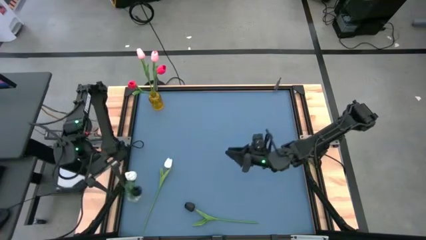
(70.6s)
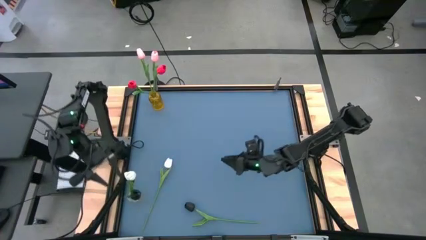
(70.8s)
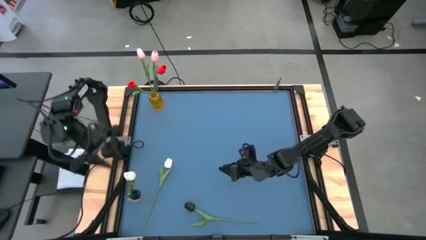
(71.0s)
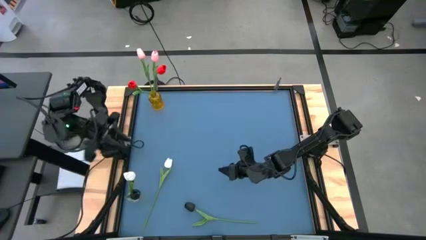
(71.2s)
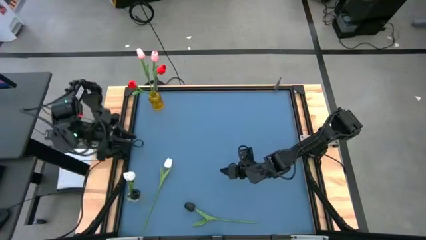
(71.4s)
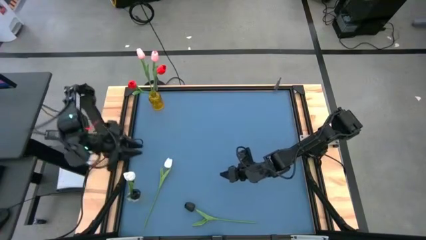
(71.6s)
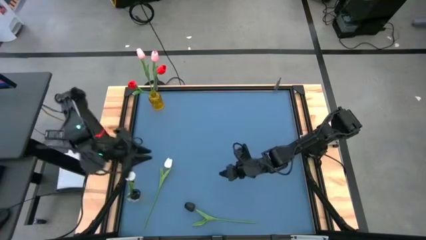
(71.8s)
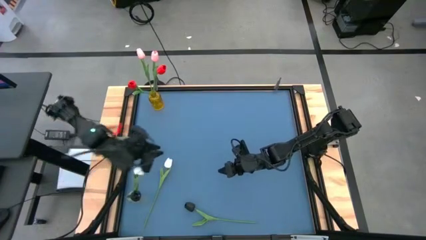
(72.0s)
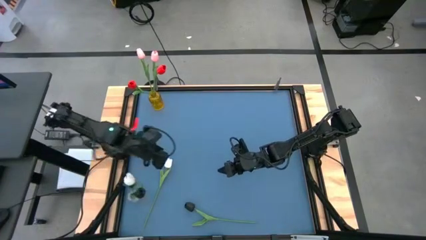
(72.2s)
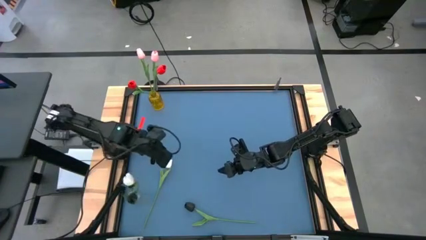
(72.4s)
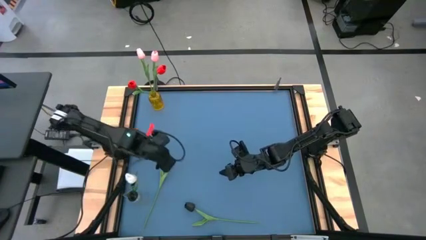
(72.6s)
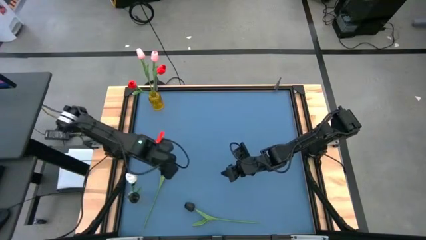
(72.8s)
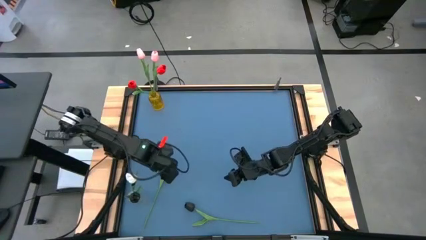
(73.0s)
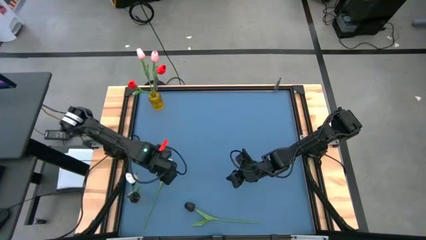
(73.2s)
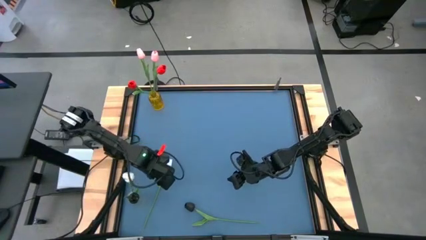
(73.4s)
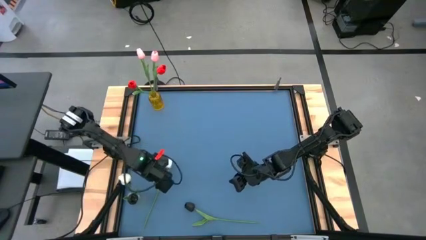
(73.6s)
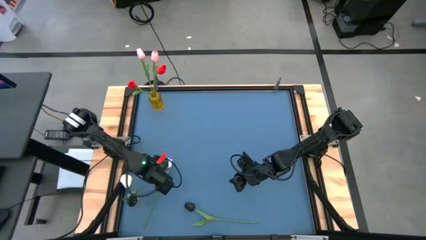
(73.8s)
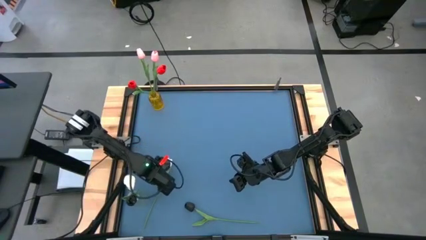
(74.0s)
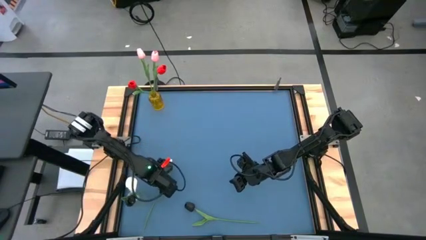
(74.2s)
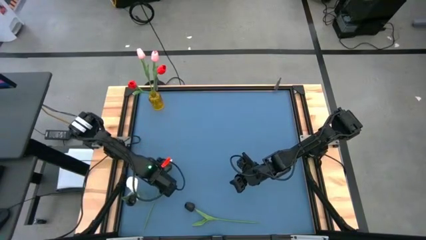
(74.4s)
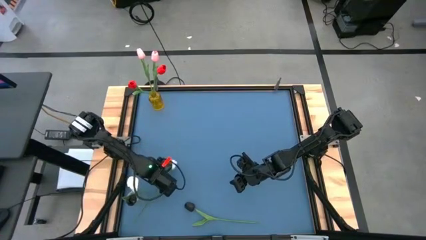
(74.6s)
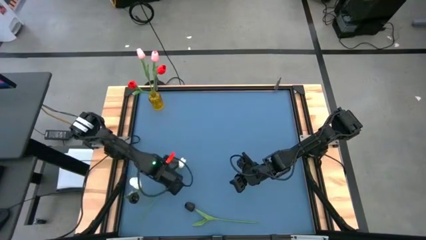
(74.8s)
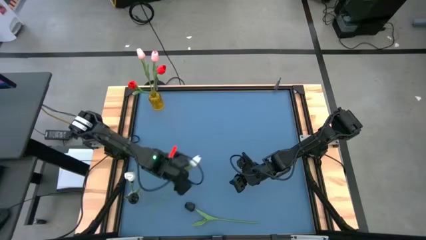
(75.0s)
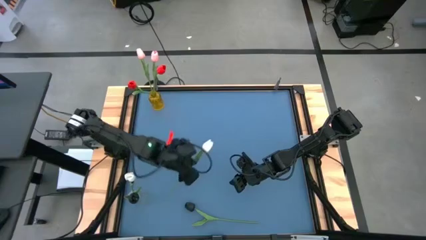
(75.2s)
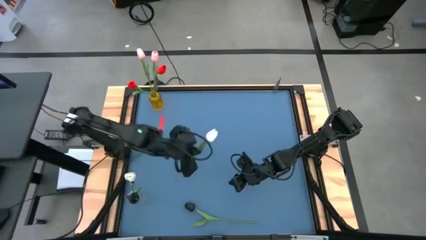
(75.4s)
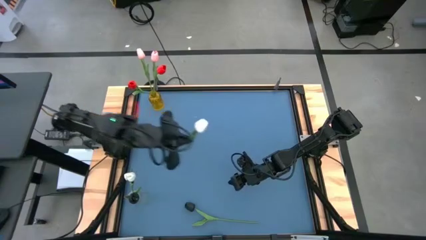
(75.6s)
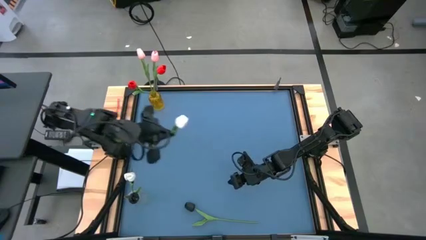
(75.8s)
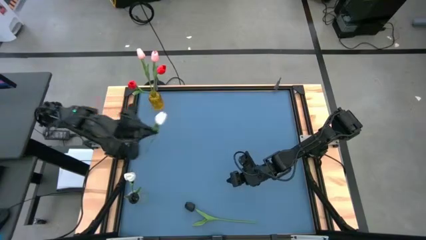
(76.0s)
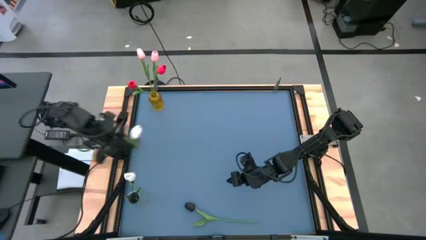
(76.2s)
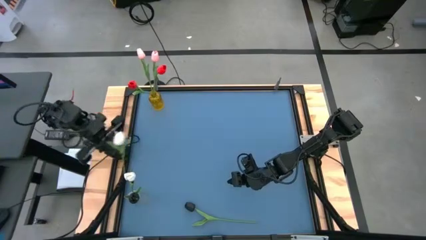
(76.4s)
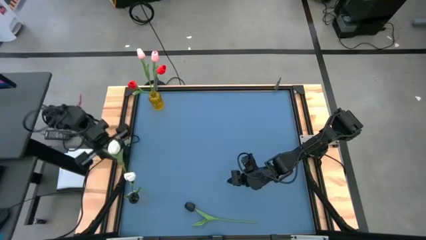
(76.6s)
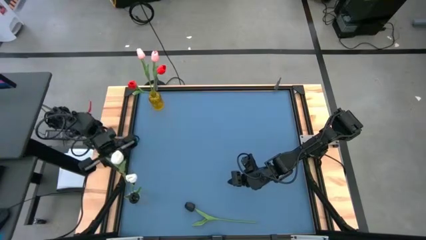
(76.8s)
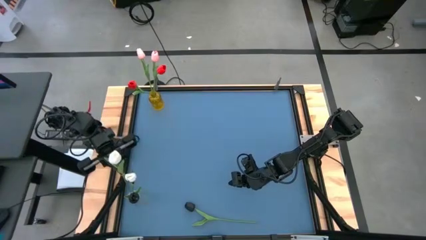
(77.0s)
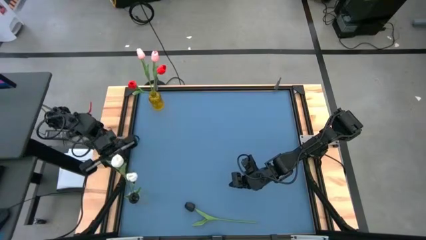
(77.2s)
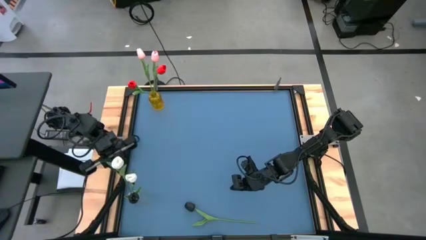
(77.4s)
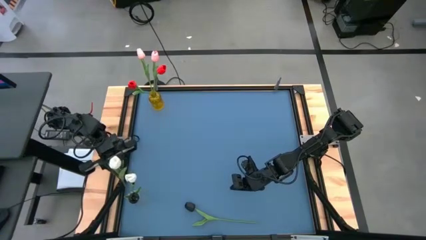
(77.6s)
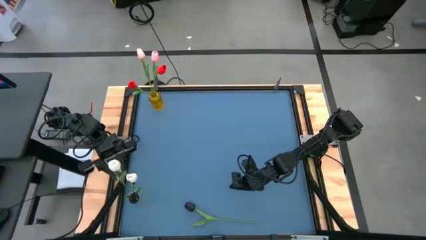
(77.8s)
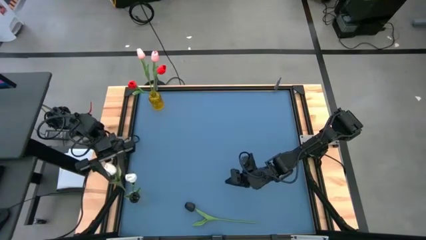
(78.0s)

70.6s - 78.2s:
Task: Sort flowers into vase by color
Put the white flower into the transparent vase

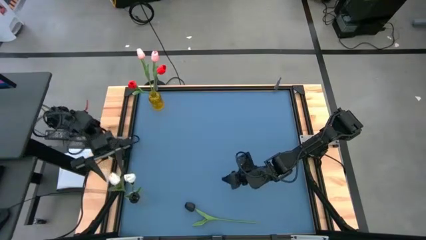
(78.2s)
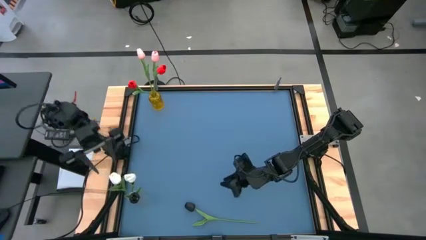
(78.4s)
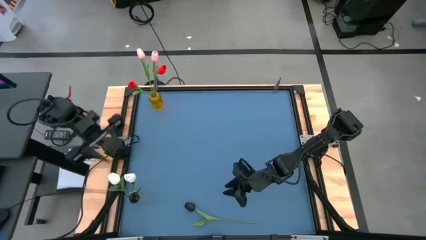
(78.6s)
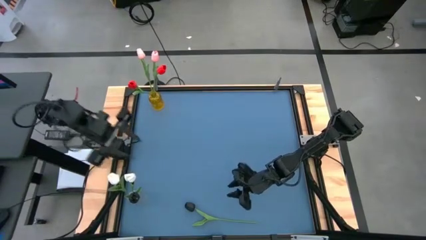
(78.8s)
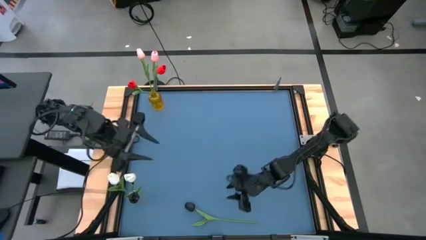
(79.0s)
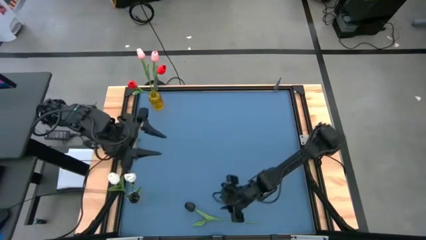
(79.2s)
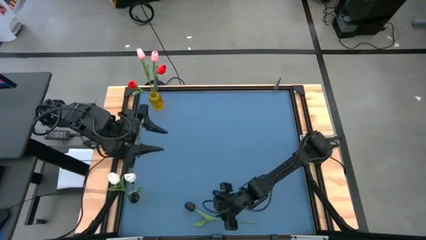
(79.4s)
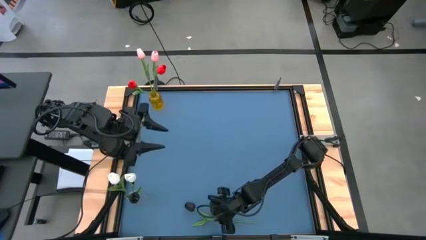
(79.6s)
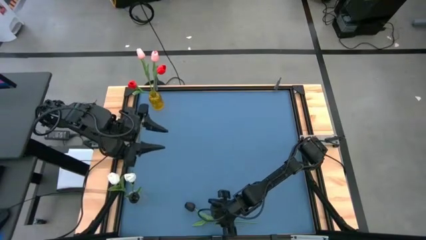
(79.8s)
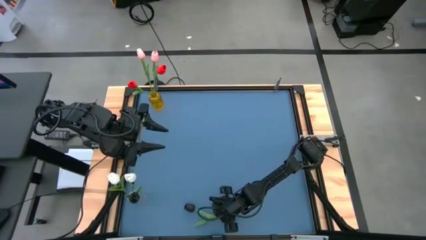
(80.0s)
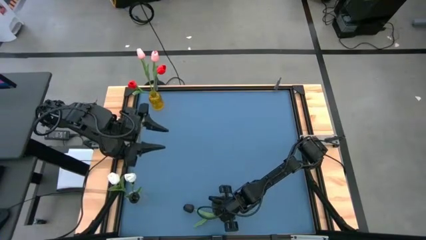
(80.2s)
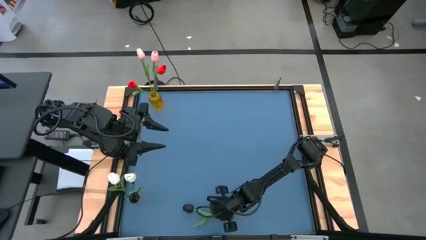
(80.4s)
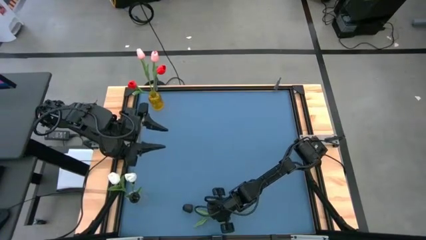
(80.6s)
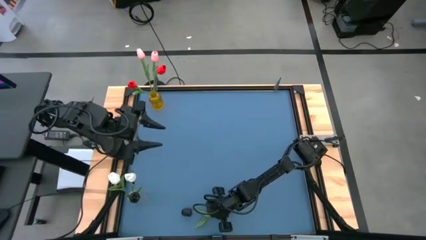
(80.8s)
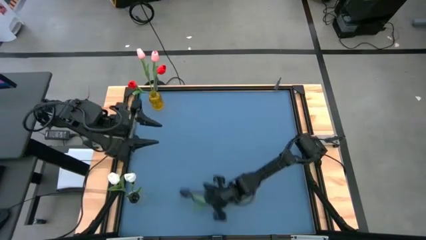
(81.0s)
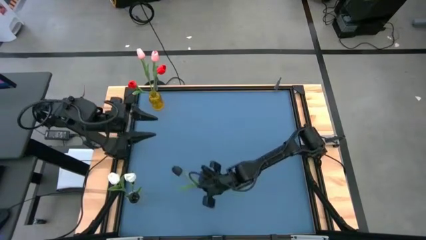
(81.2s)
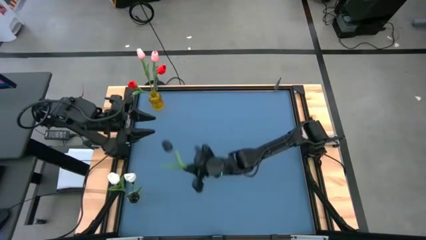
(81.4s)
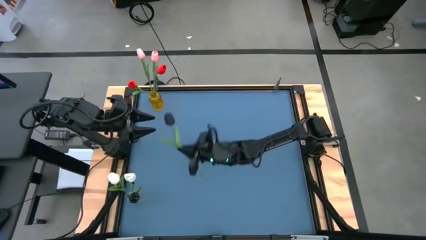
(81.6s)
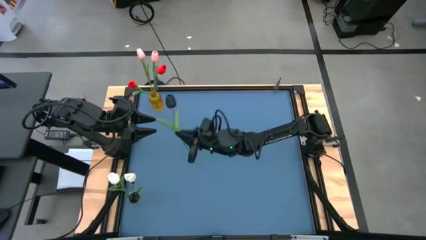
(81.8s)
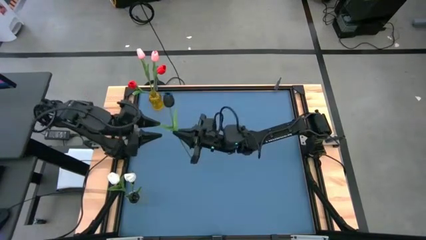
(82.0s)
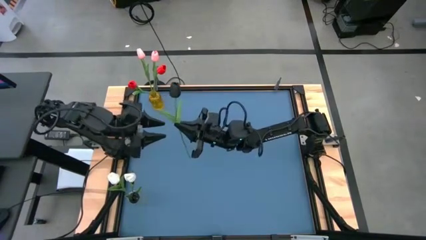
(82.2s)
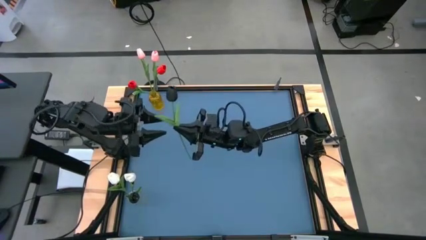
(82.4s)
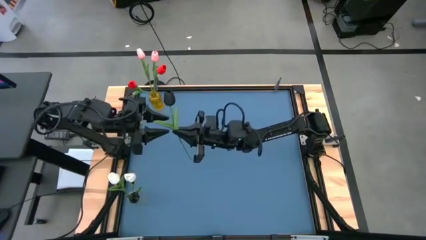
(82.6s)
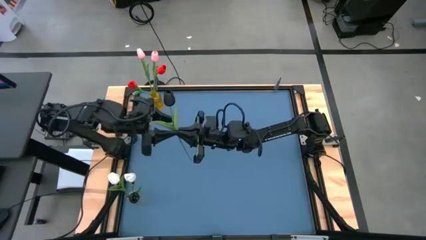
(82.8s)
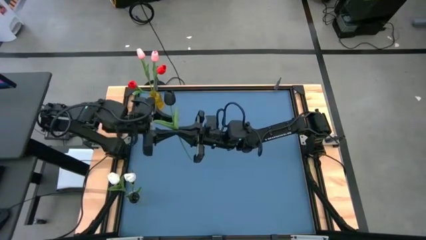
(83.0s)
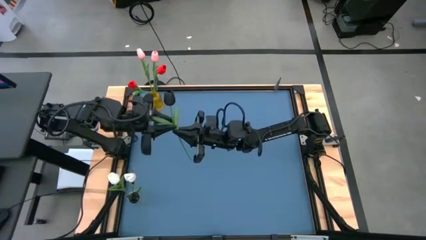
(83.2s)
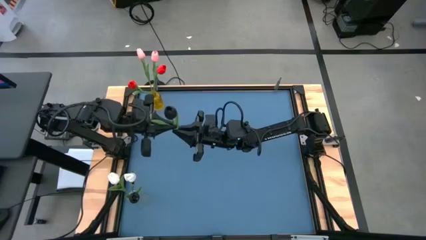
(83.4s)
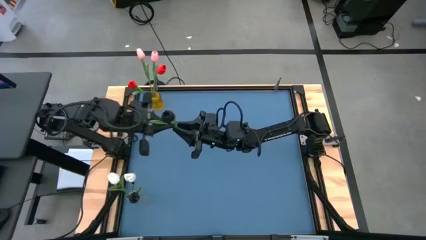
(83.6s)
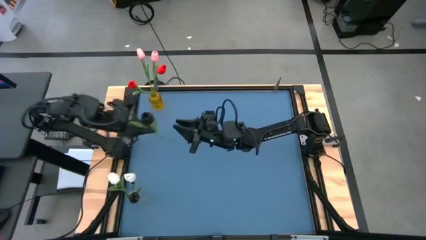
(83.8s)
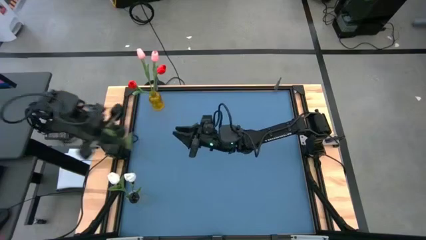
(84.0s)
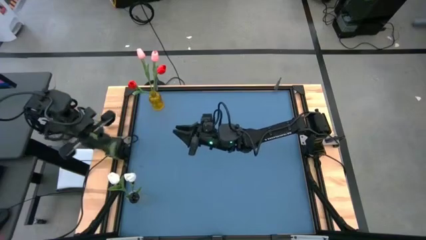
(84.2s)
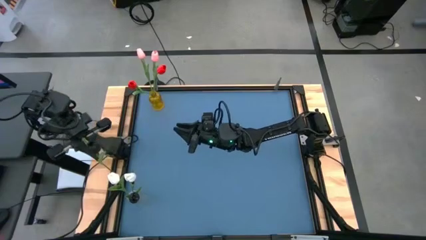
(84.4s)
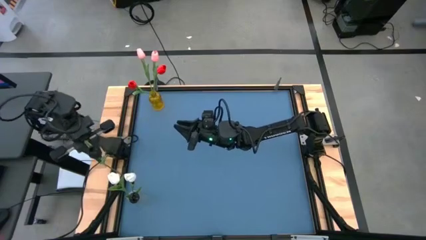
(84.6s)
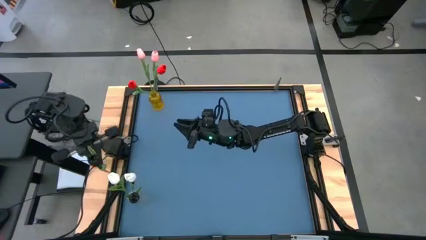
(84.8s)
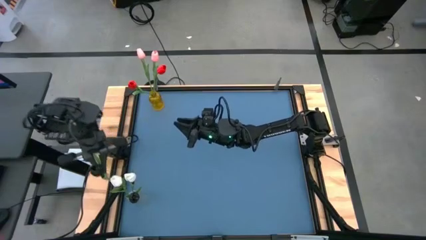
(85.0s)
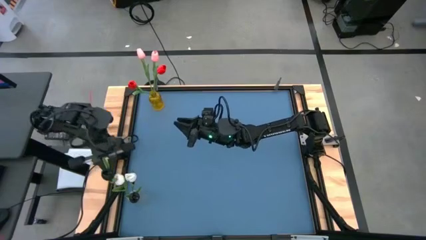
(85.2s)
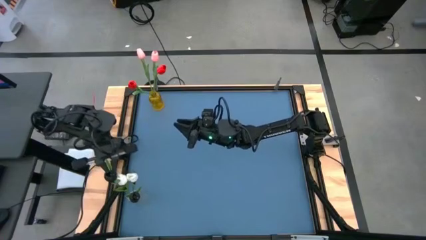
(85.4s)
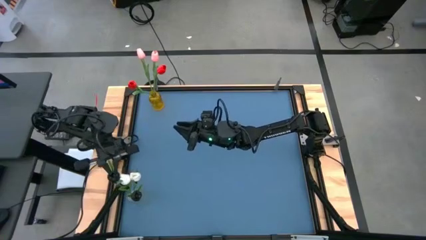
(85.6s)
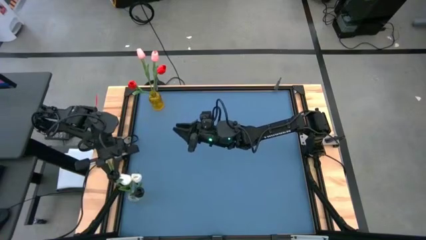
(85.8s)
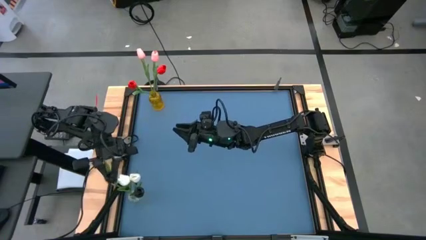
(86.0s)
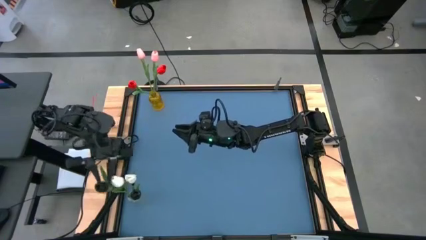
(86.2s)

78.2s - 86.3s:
Put the black flower into the transparent vase
